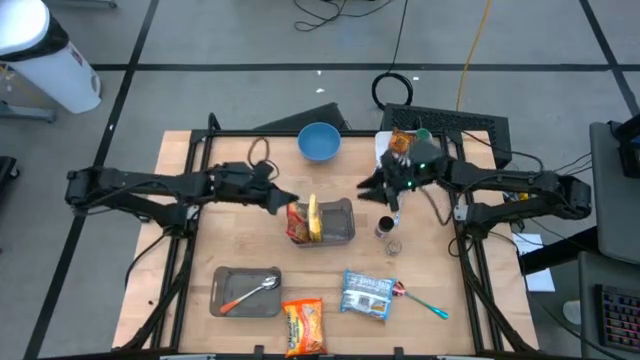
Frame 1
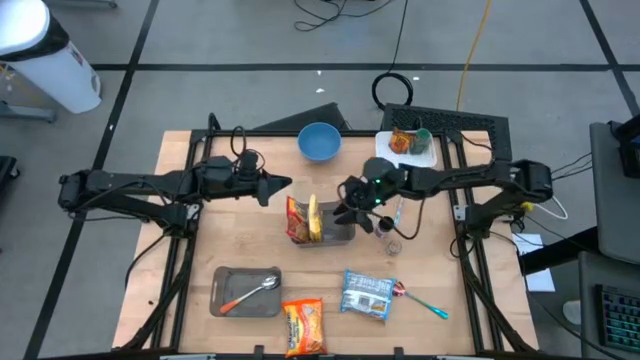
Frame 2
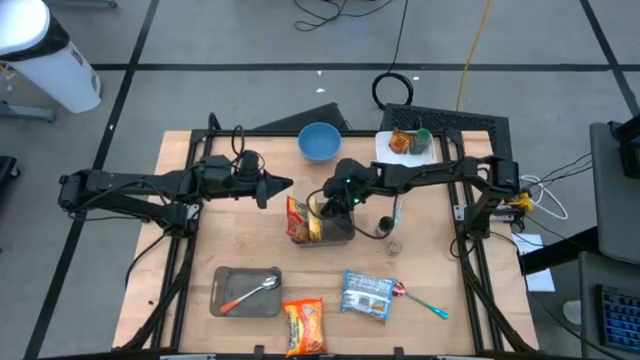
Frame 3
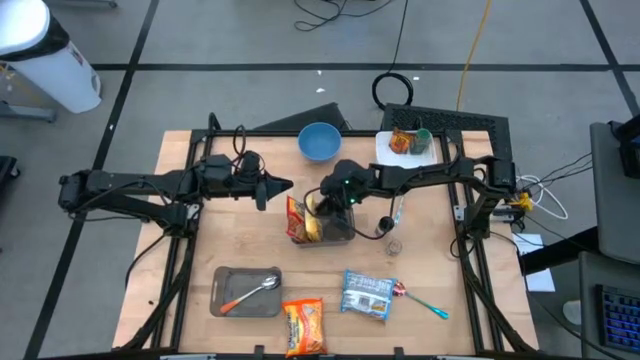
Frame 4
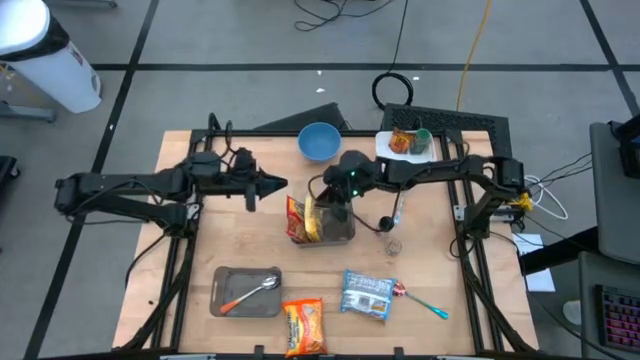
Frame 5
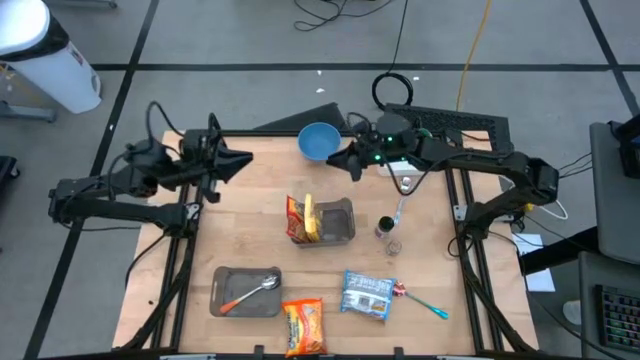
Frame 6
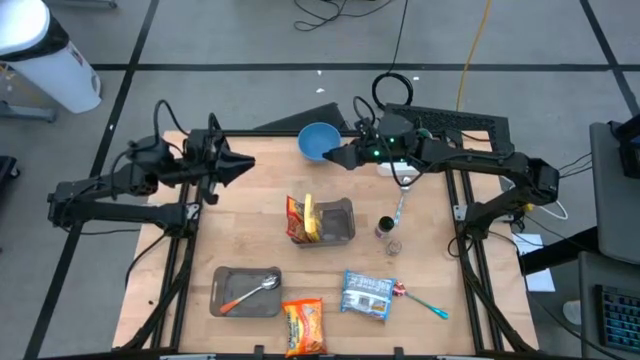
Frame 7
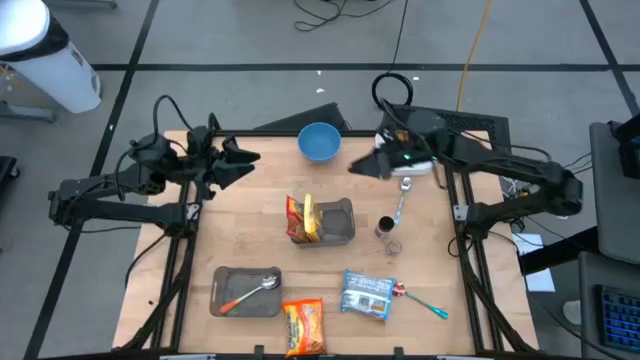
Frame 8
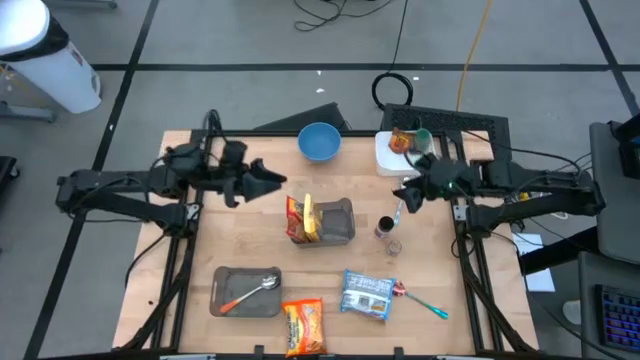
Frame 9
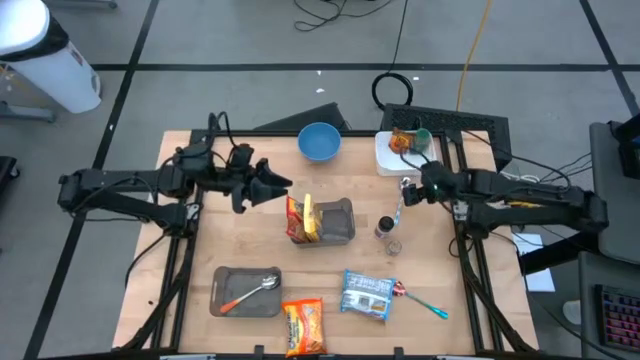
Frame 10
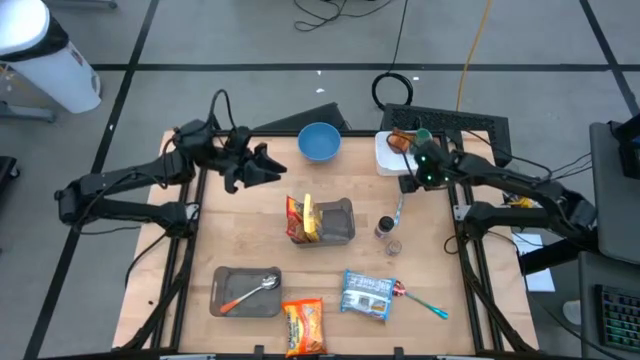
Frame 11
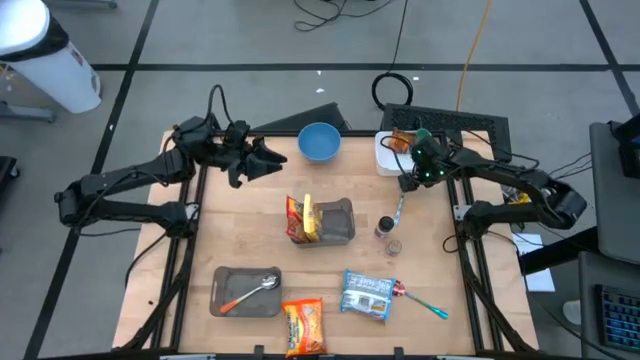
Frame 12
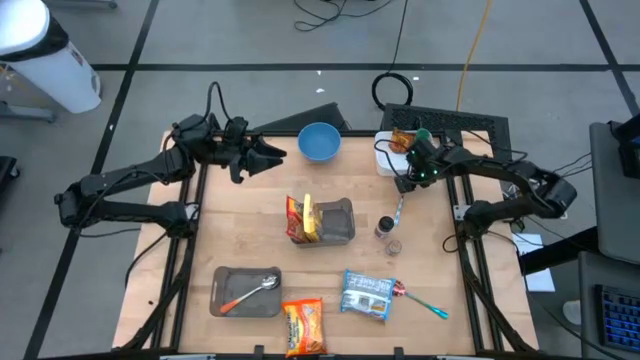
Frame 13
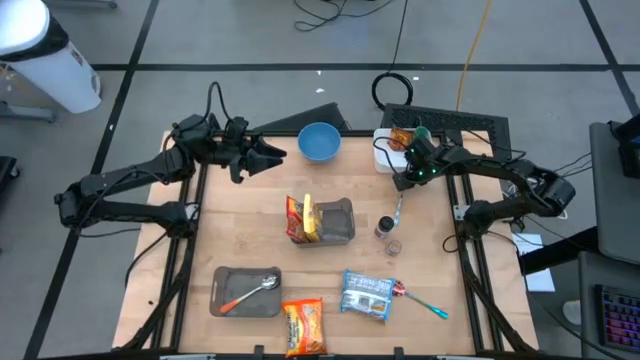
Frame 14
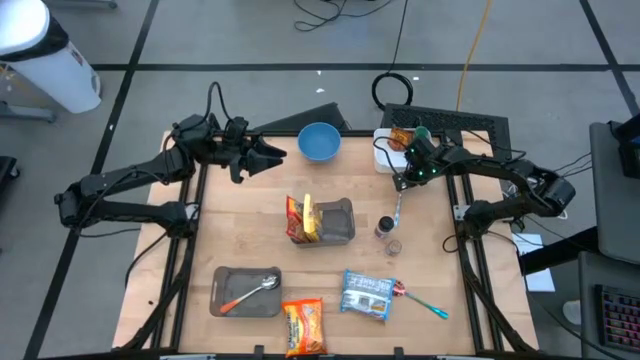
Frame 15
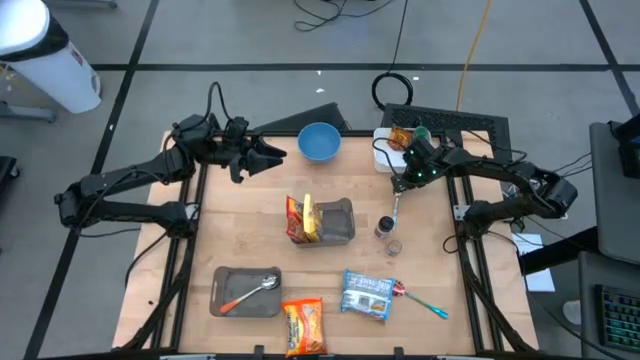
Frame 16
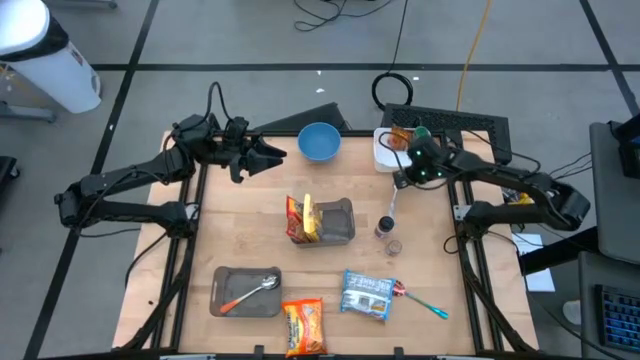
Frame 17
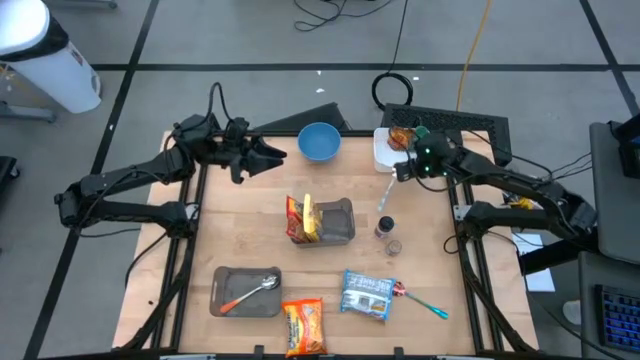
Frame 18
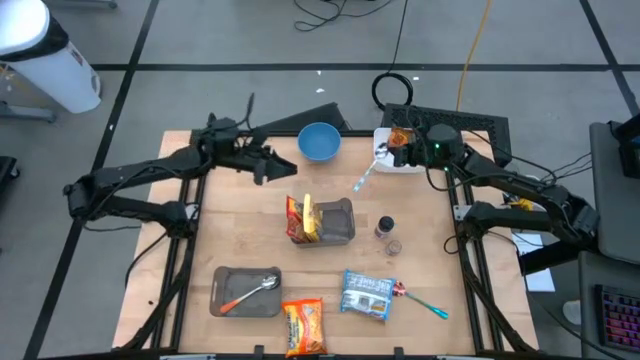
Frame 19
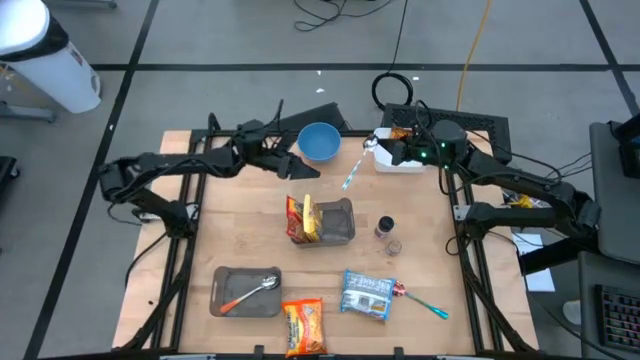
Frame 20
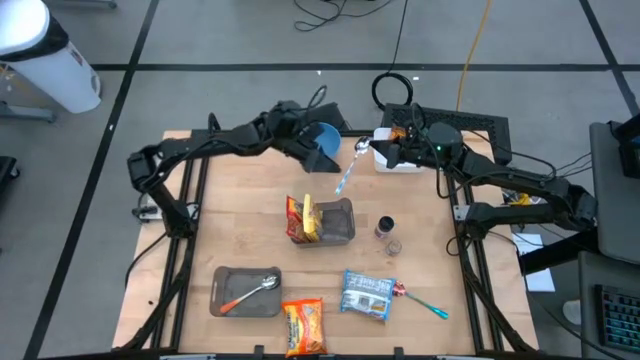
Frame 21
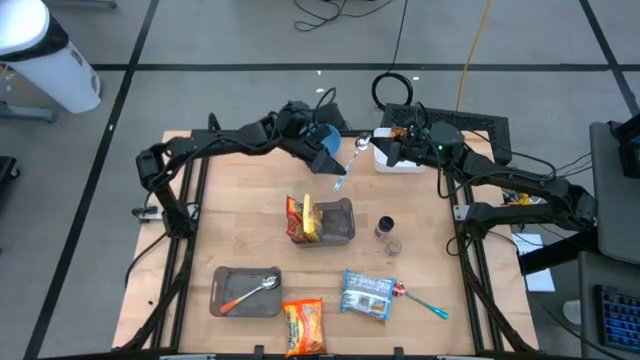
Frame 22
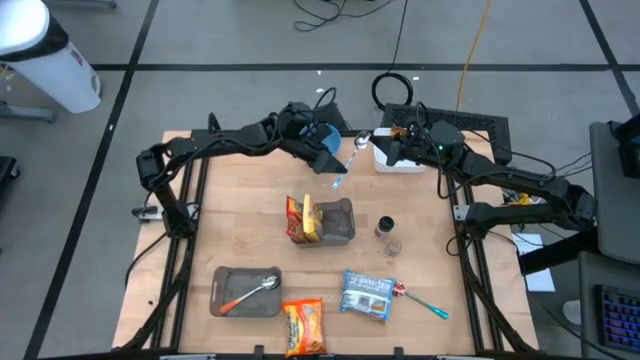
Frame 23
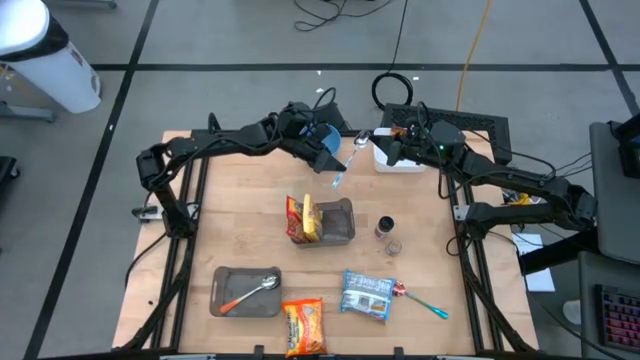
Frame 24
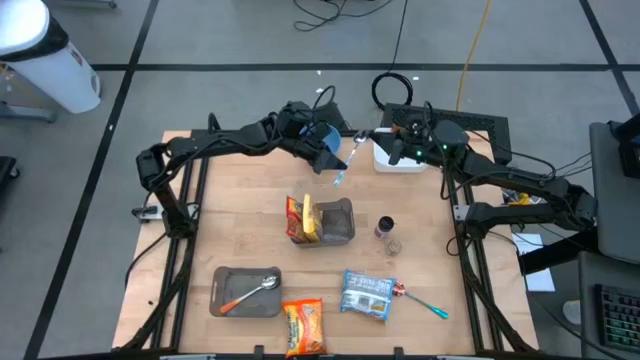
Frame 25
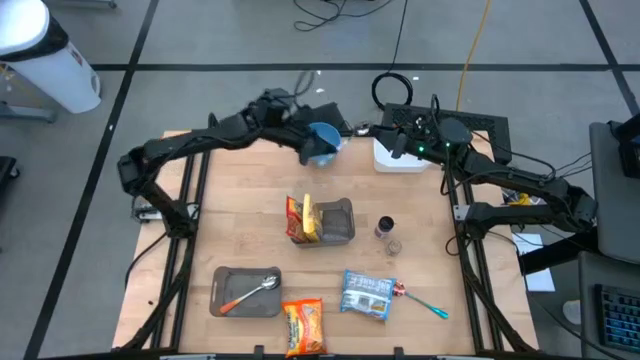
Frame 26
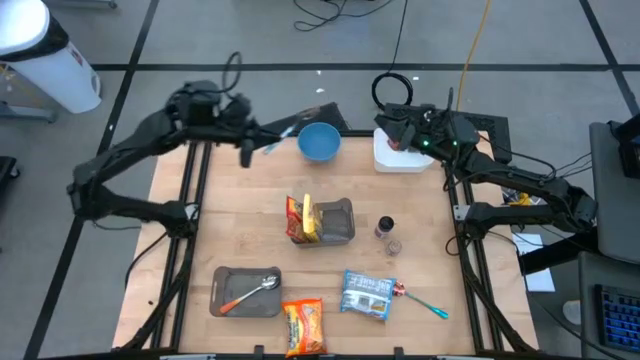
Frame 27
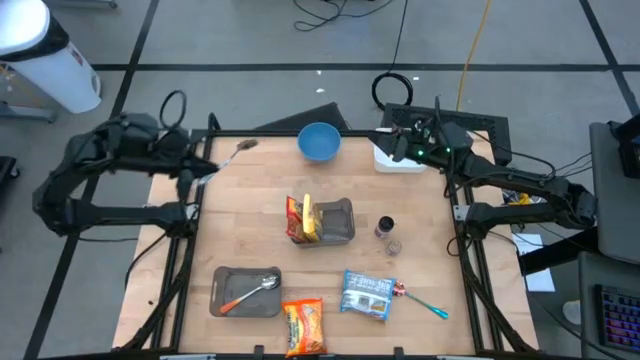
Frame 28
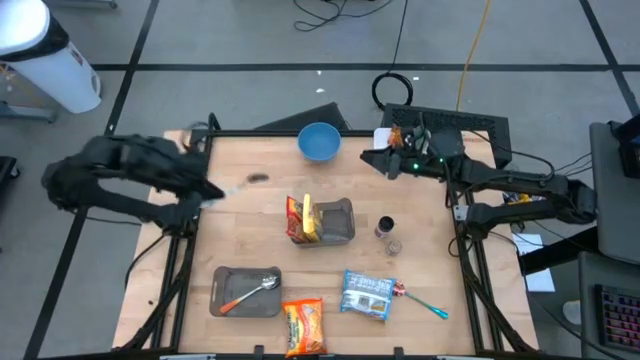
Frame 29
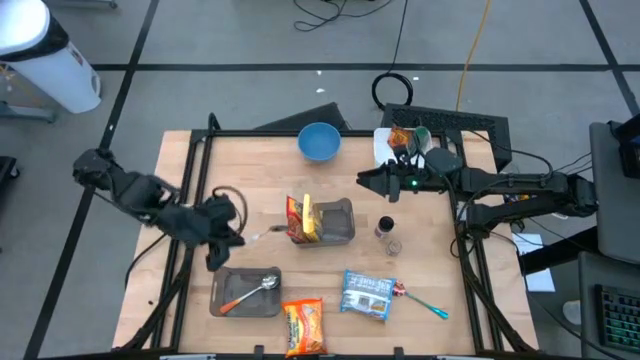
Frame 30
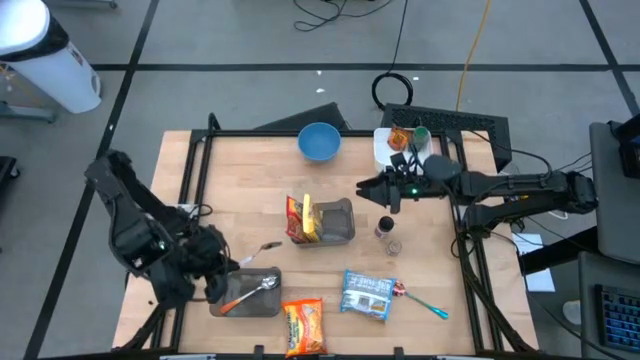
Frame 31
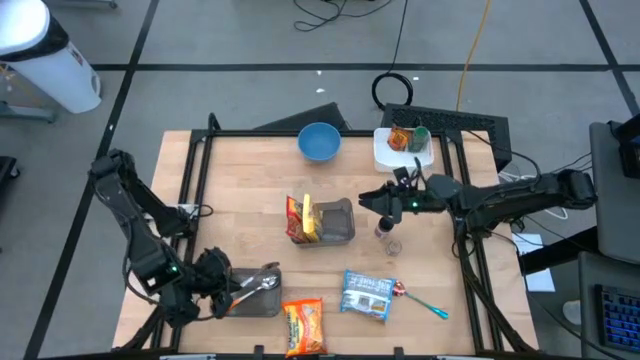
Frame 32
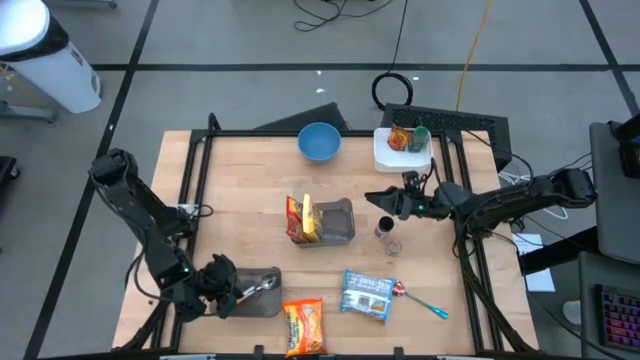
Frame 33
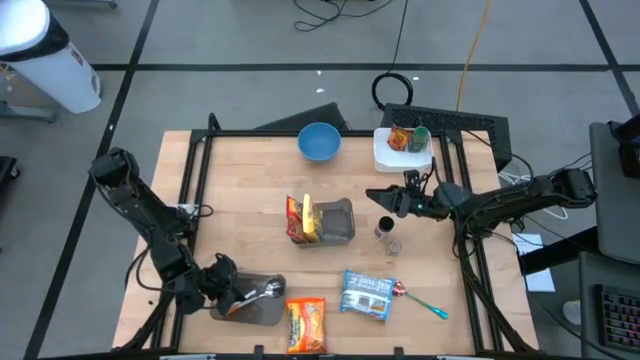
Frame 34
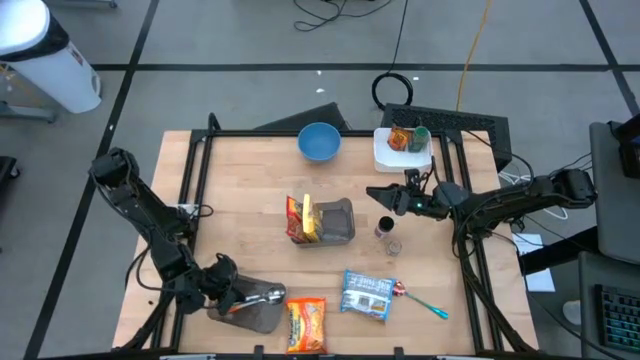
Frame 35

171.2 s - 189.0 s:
Task: Pick & Place Food Item
Put the white and blue spoon into the bottom black bin

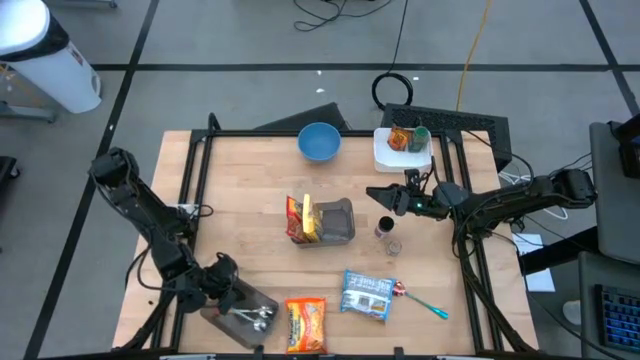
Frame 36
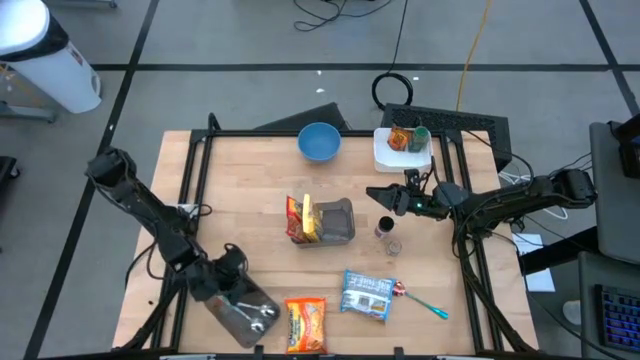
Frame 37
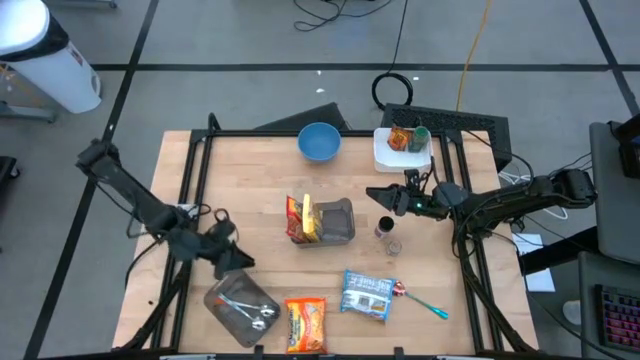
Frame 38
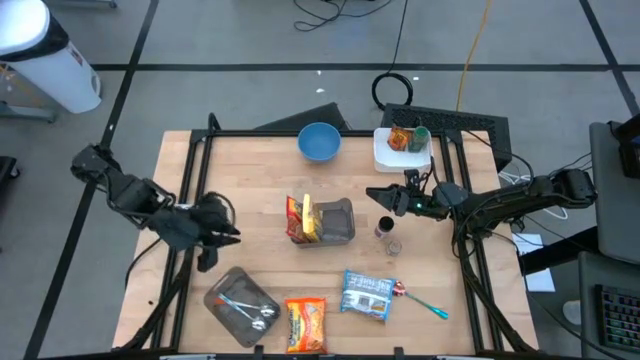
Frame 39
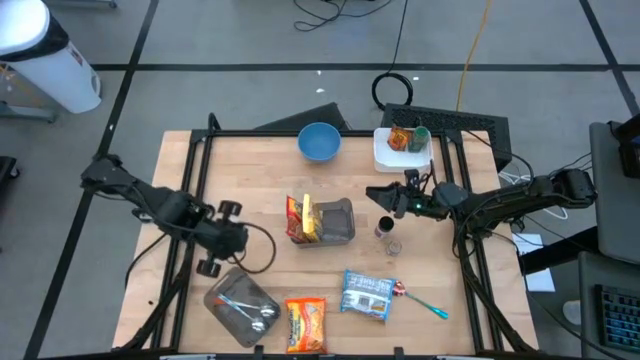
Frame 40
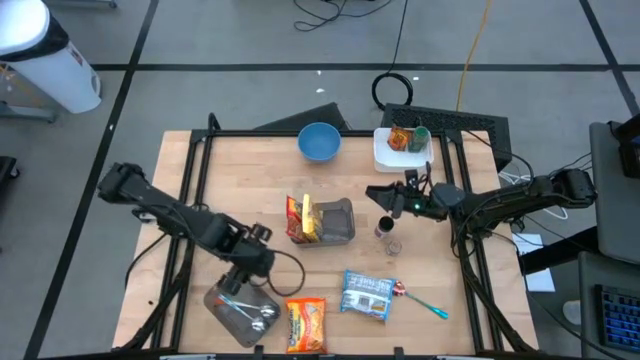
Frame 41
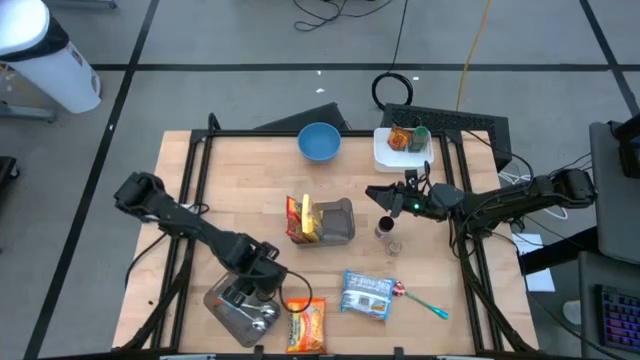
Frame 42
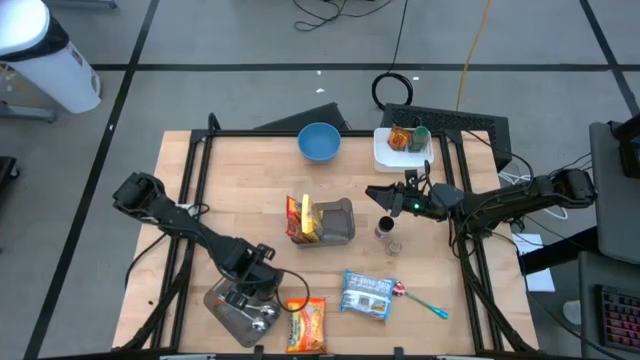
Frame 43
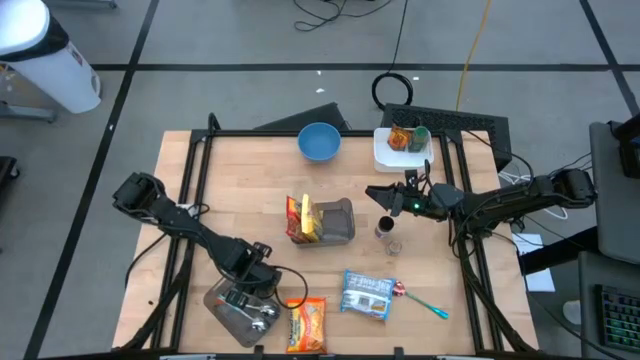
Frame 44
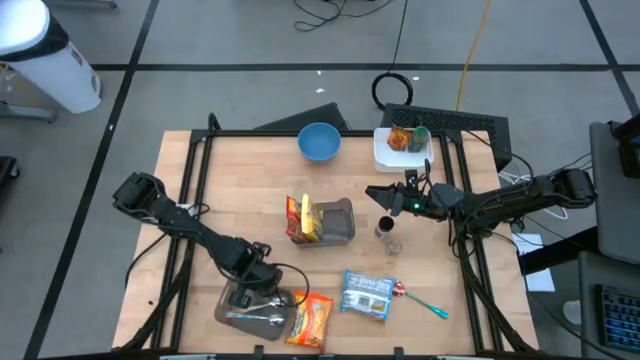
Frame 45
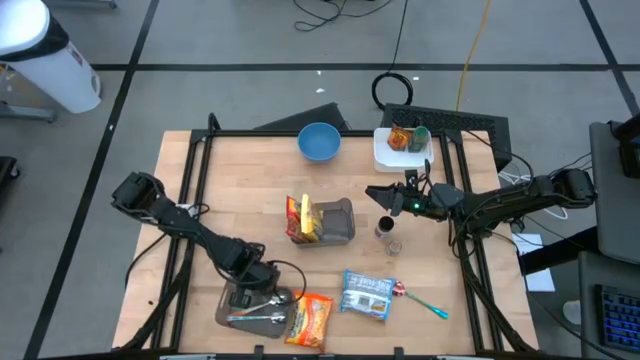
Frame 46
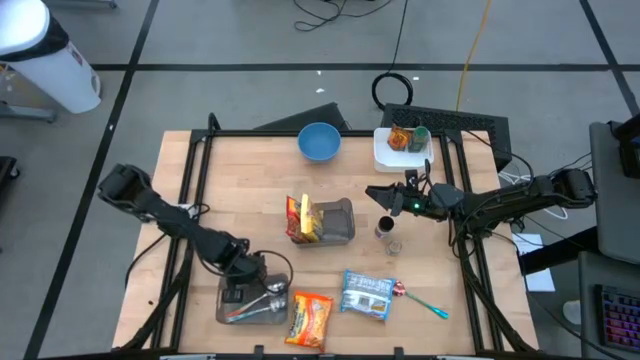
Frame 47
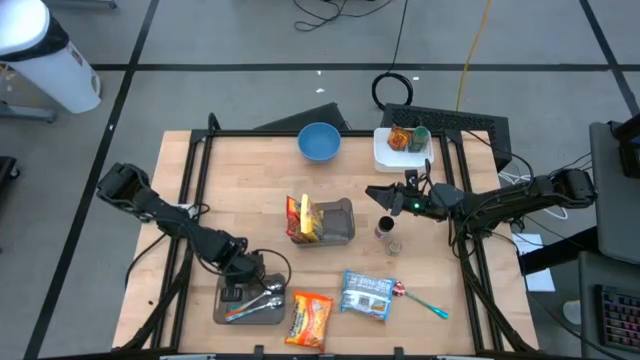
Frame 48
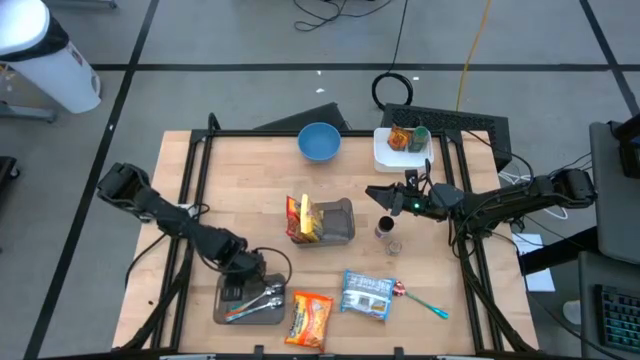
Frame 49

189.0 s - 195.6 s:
Adjust the bottom black bin
